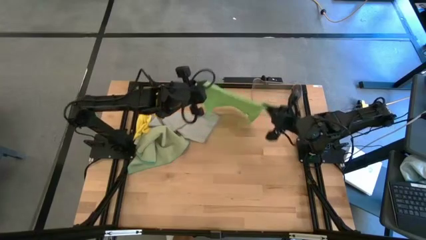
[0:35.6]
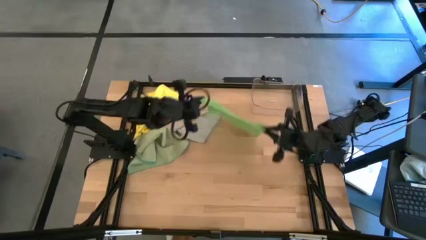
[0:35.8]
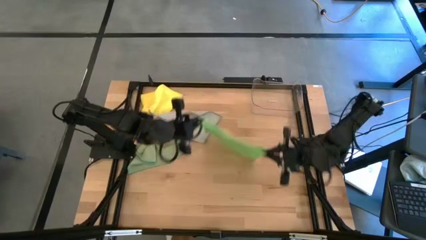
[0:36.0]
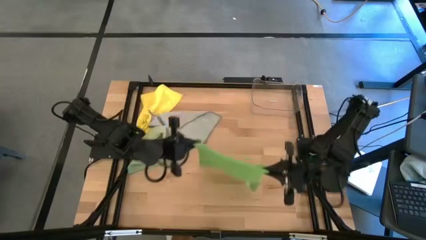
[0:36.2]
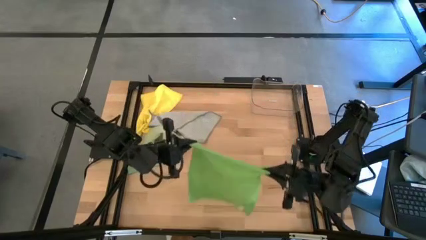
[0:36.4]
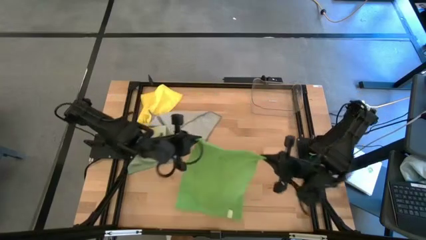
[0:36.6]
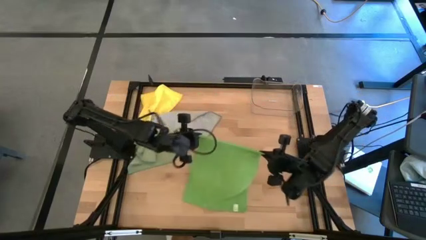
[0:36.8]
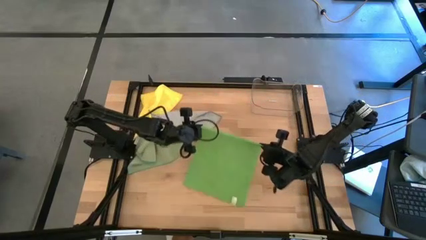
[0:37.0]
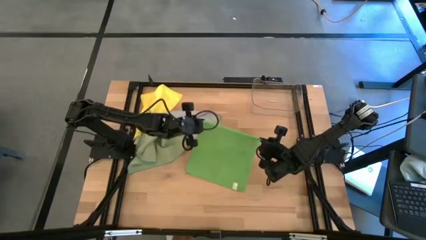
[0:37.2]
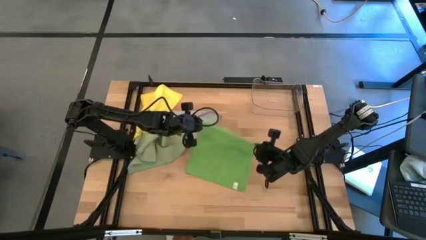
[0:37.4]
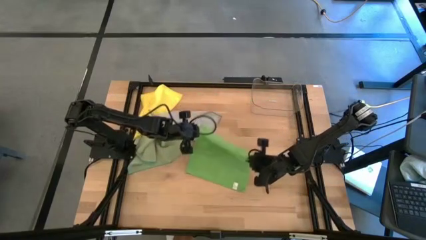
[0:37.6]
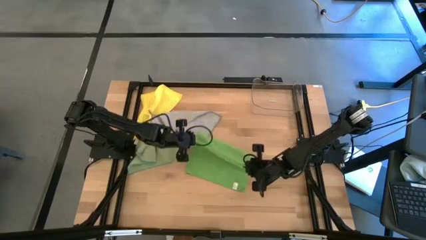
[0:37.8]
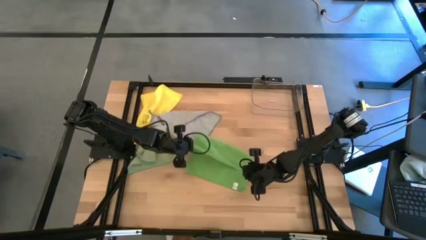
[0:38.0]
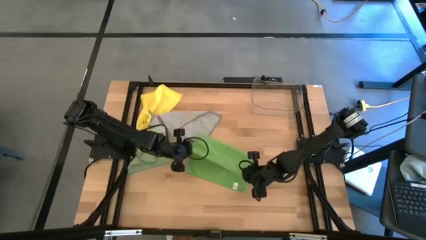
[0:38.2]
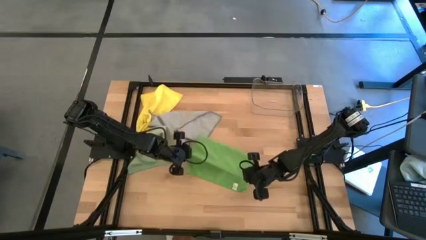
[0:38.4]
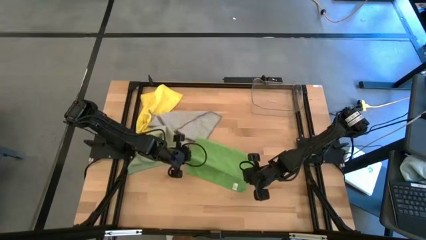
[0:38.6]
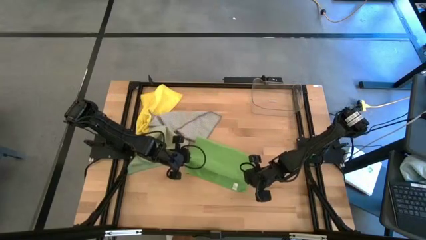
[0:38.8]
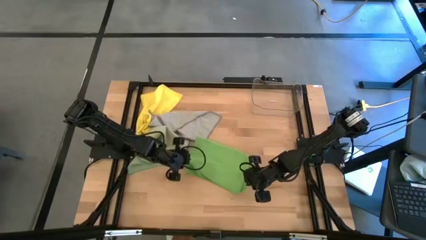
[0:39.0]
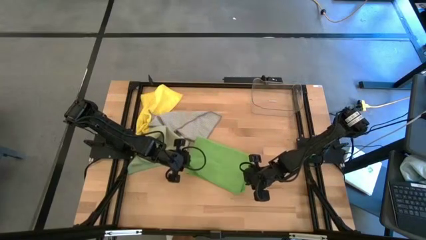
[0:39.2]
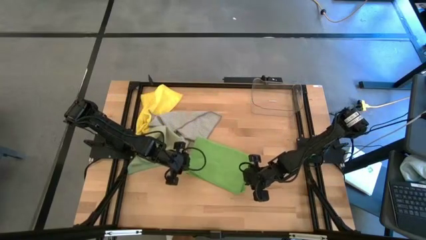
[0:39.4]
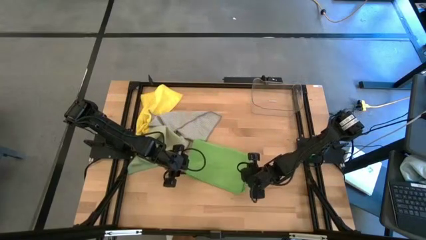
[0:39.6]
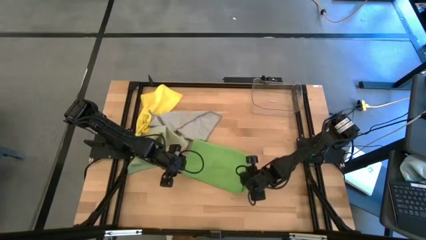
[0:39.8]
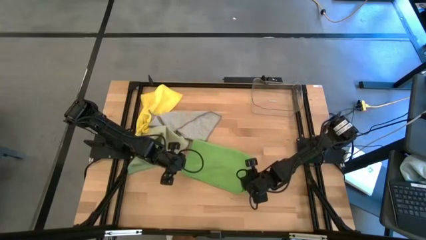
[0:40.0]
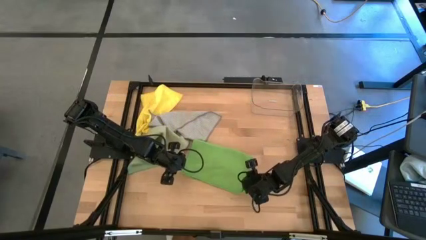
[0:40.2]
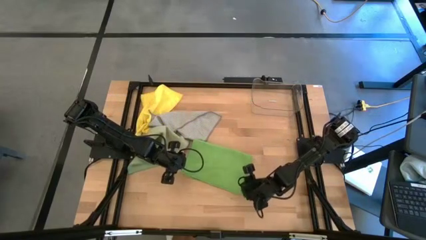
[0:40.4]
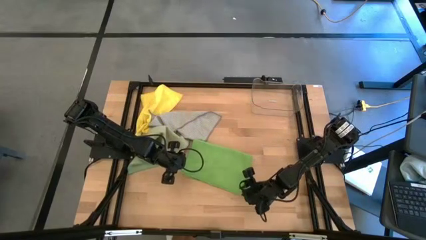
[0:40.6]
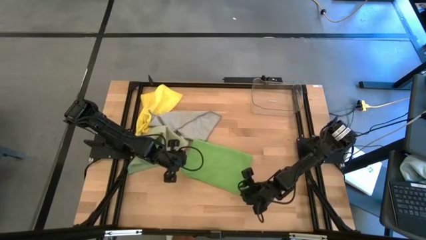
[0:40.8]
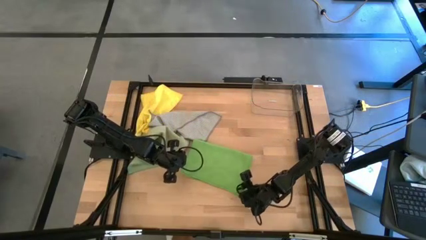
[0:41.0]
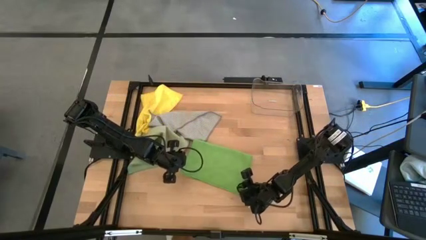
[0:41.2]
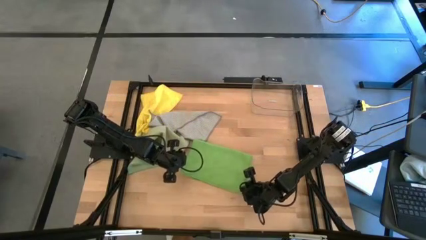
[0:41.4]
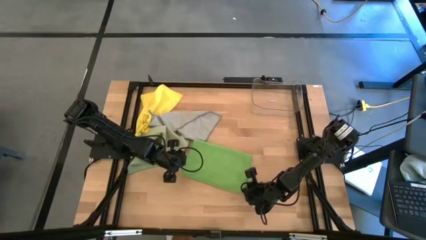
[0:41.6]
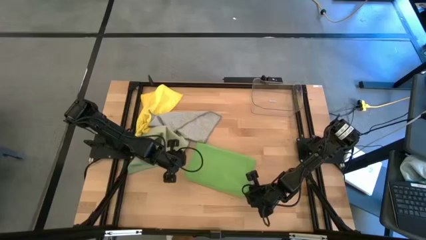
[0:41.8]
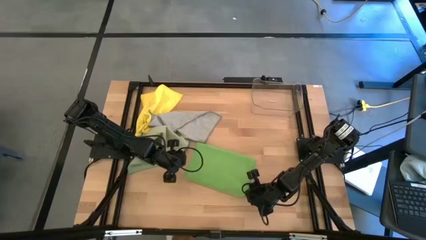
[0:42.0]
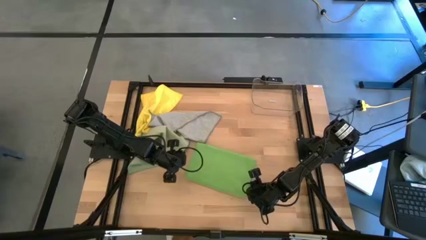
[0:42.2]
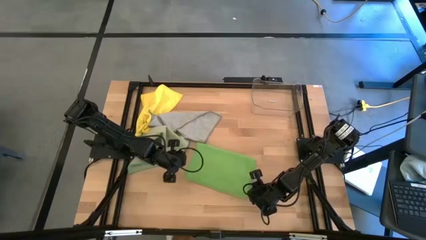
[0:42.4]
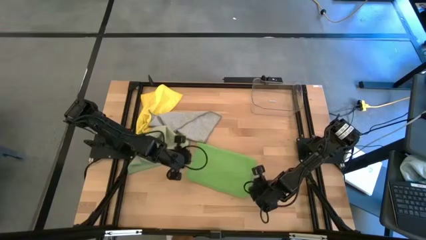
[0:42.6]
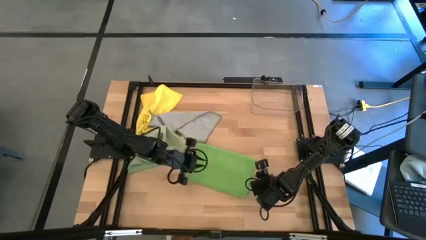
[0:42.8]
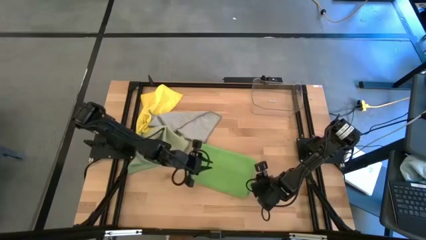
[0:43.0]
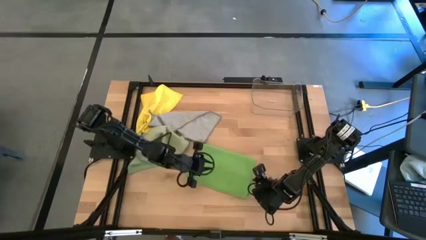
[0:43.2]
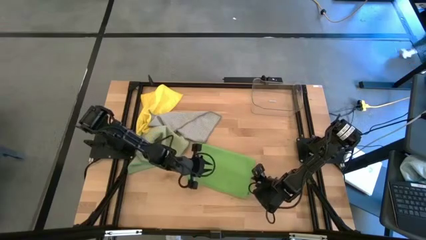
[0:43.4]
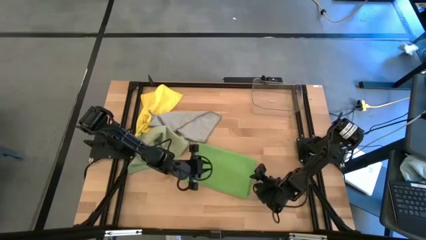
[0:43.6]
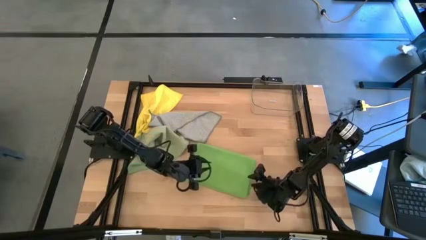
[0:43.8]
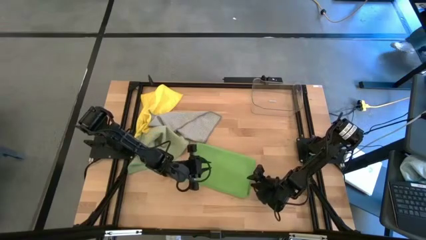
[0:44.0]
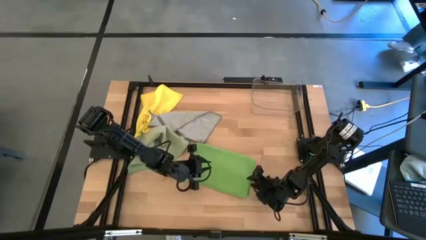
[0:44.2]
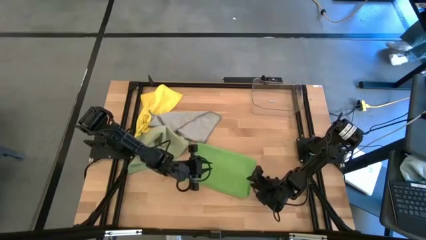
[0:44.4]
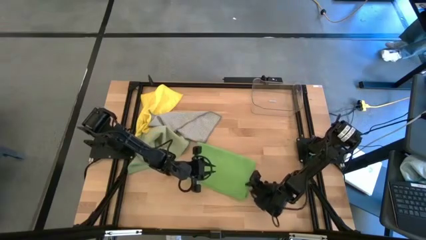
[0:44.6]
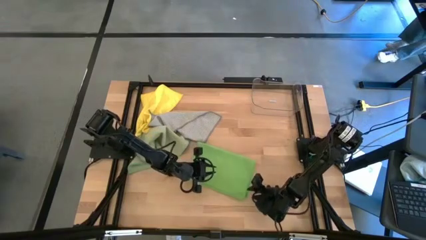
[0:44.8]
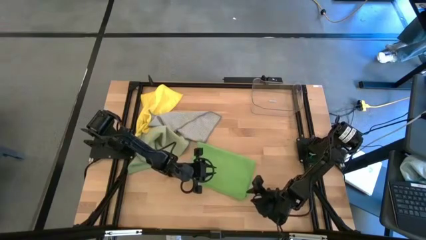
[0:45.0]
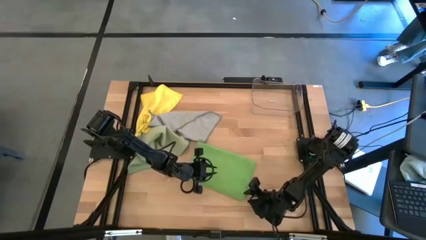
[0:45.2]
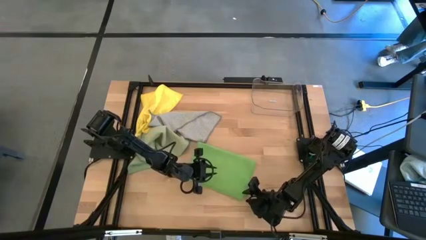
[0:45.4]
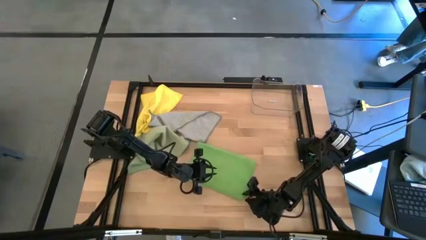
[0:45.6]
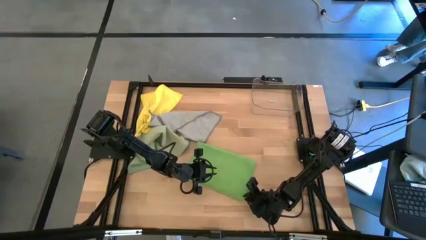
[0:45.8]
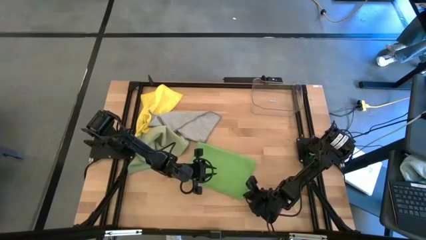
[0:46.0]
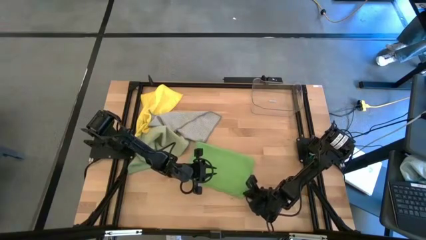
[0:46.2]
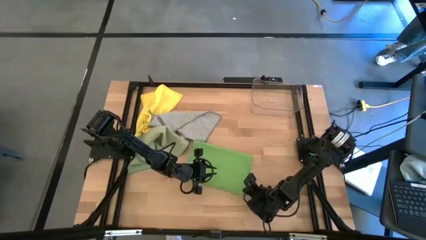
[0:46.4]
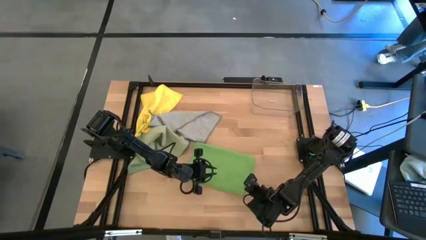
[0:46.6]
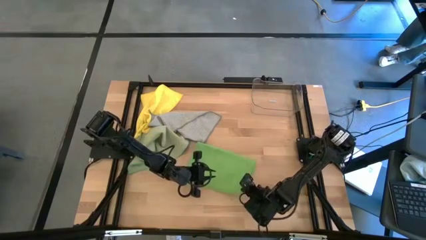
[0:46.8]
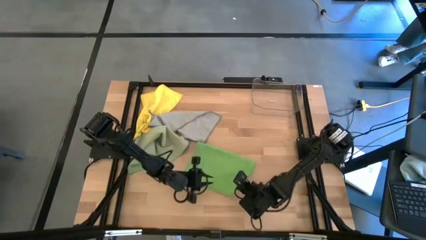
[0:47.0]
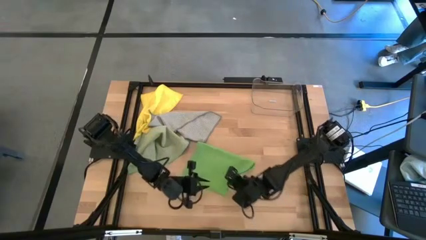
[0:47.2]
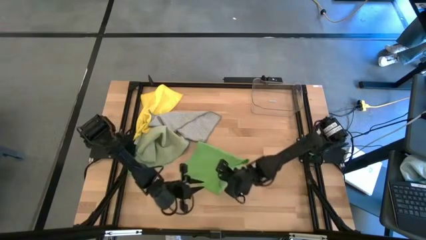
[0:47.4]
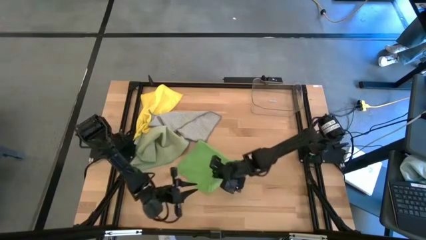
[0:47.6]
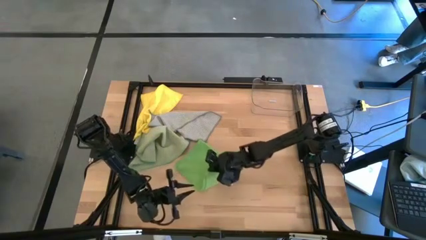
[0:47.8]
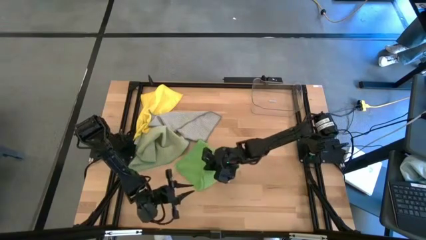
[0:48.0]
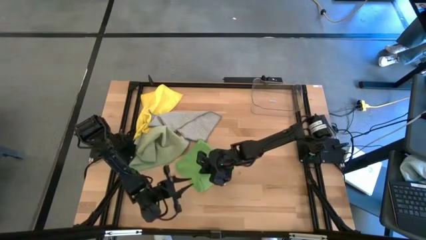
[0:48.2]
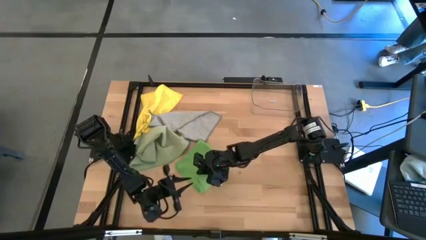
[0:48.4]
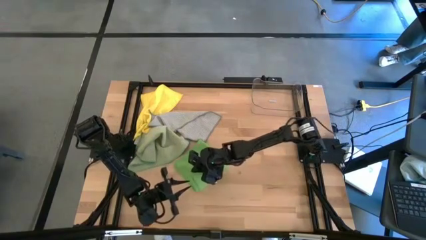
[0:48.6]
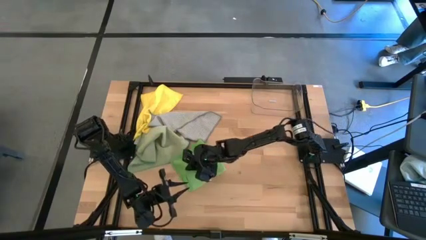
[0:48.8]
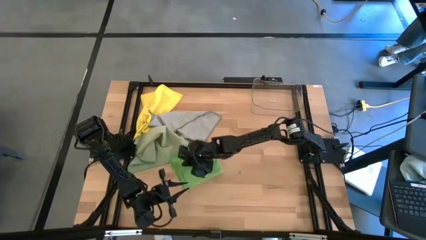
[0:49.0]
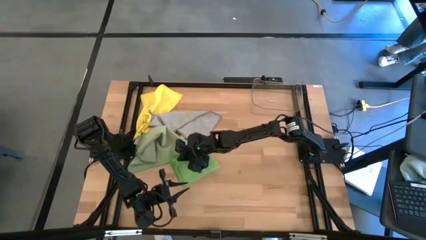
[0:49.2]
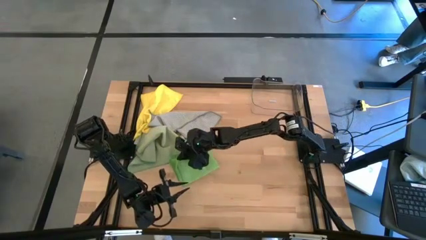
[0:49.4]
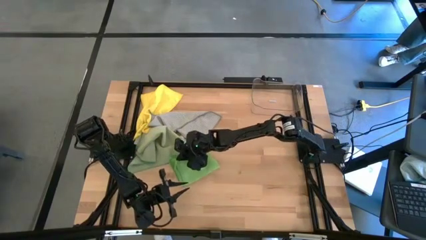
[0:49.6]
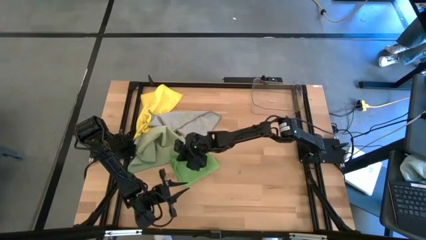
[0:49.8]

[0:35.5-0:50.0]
Task: Fold microfiber towels
Fold the green cloth

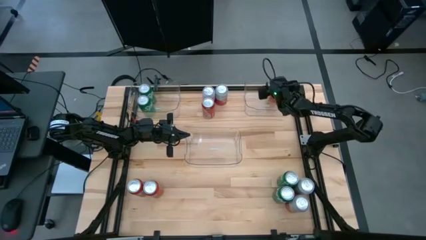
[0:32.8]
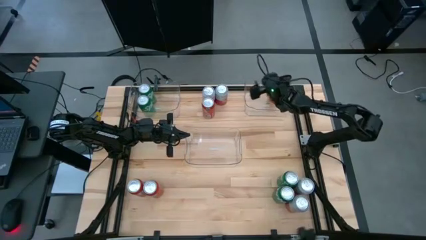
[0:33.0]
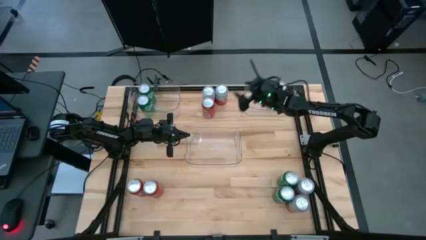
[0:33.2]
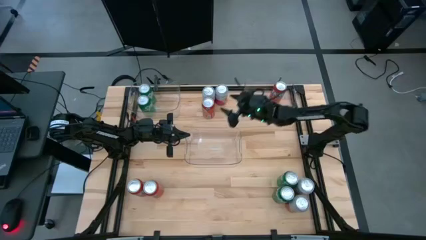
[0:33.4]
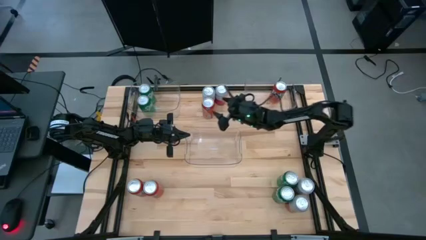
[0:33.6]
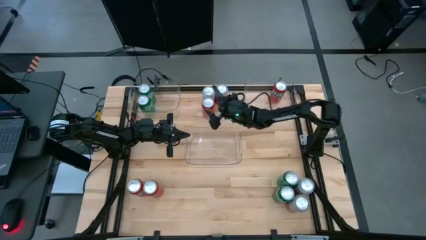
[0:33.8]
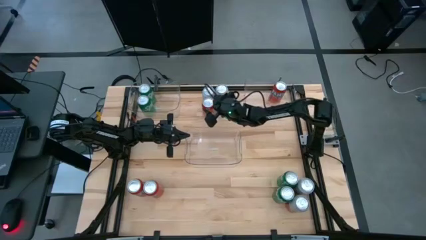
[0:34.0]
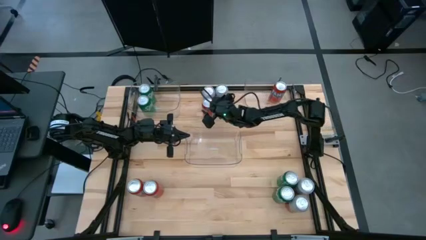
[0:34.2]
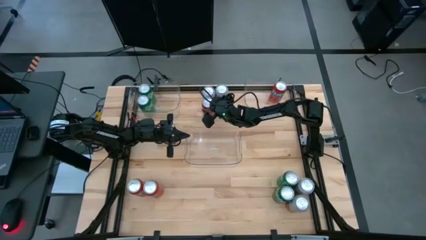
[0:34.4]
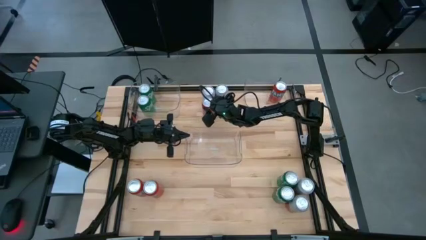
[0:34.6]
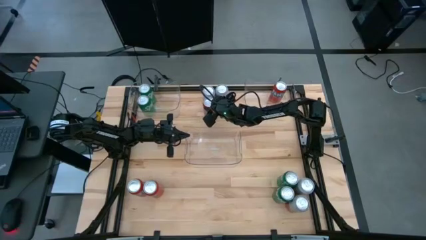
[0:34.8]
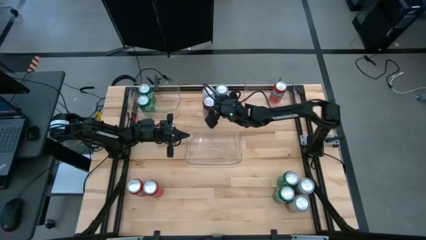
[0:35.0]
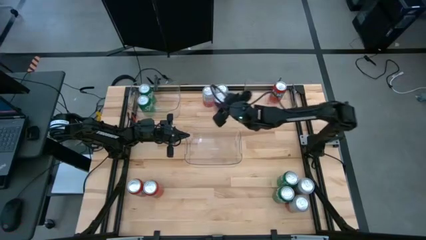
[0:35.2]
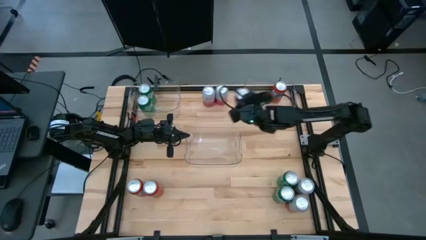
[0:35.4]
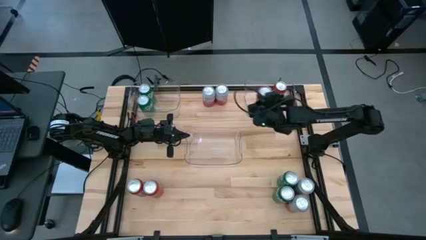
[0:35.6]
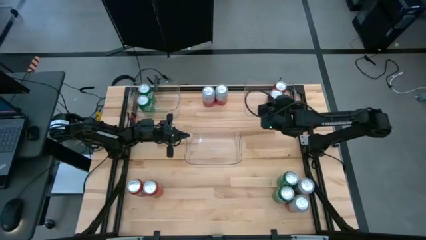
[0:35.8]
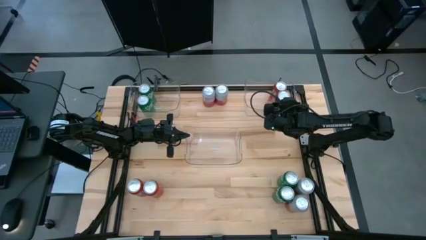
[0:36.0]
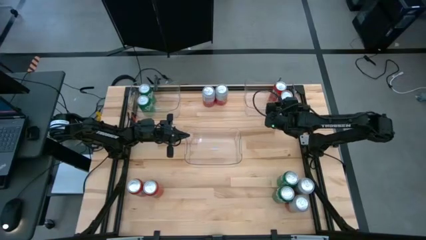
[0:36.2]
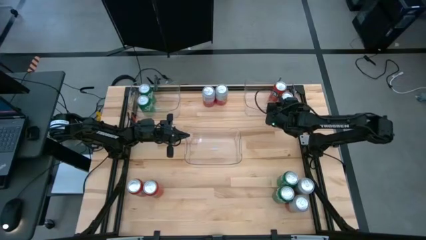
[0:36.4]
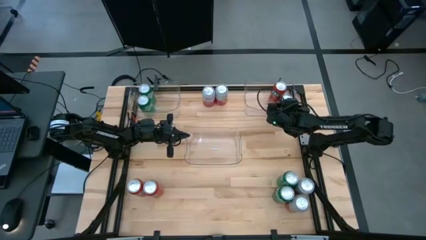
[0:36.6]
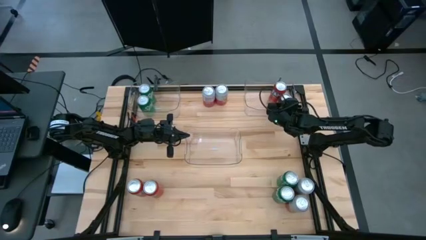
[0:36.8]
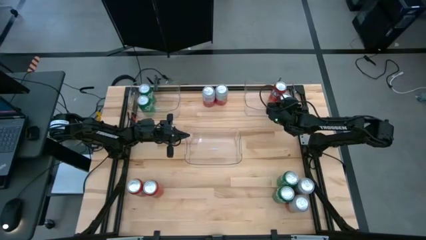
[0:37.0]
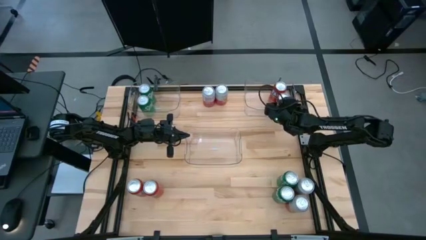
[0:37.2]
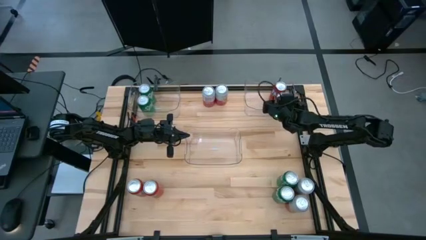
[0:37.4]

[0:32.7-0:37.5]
Task: Sort soda cans
Put the red soda can into the top right transparent bin
